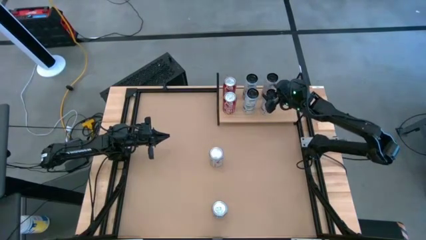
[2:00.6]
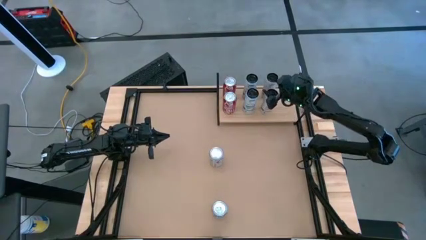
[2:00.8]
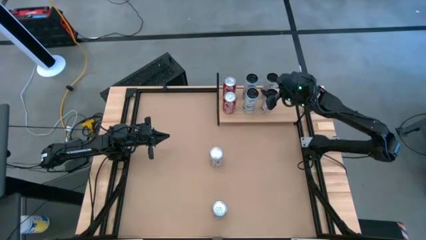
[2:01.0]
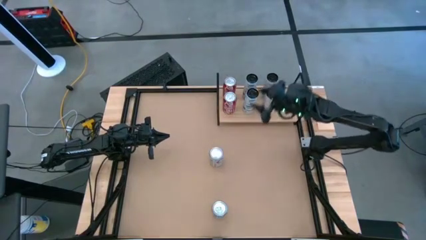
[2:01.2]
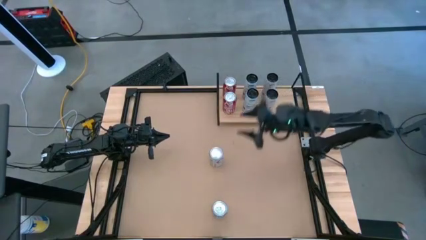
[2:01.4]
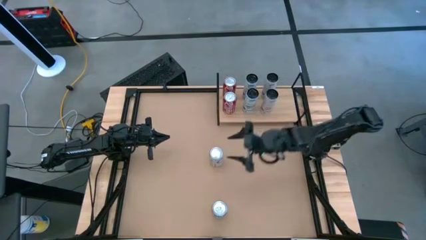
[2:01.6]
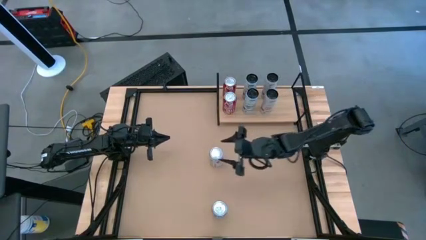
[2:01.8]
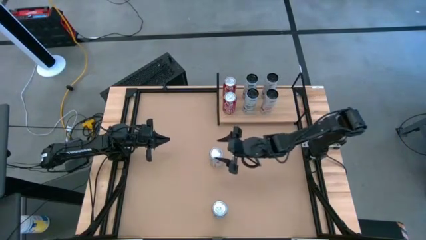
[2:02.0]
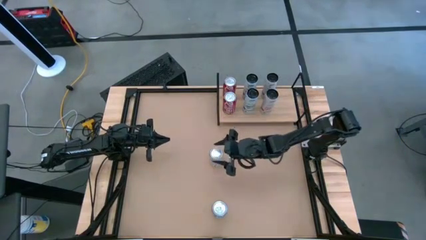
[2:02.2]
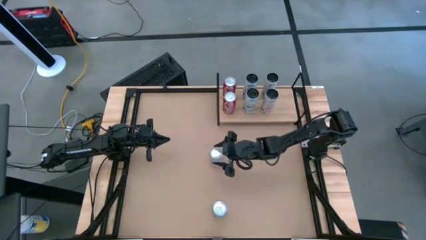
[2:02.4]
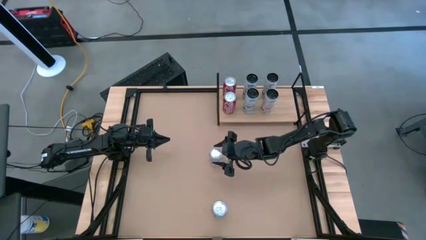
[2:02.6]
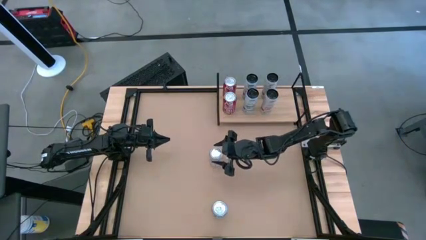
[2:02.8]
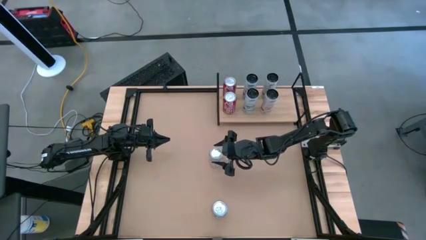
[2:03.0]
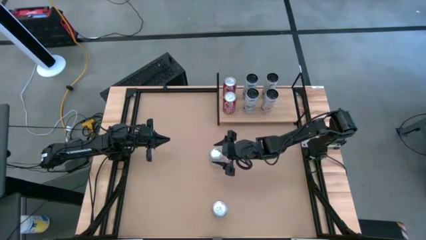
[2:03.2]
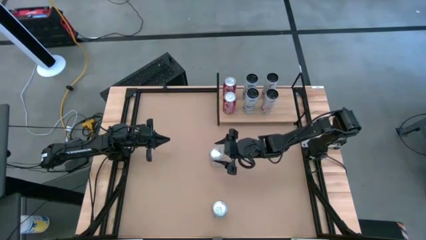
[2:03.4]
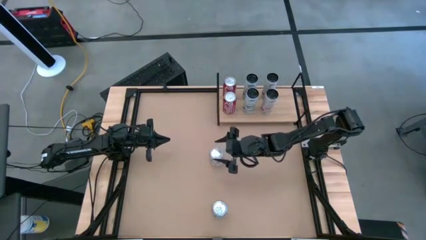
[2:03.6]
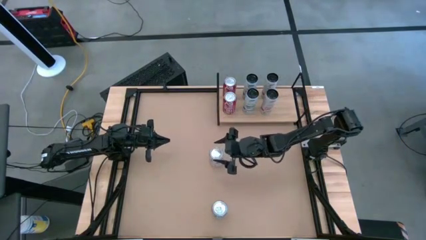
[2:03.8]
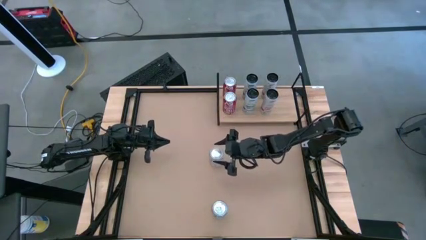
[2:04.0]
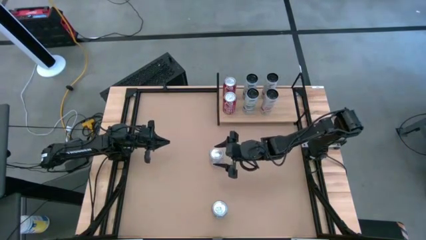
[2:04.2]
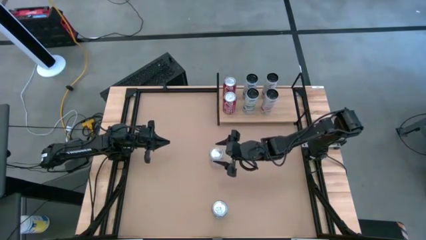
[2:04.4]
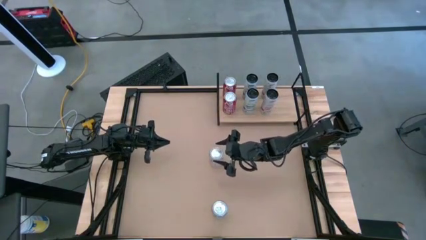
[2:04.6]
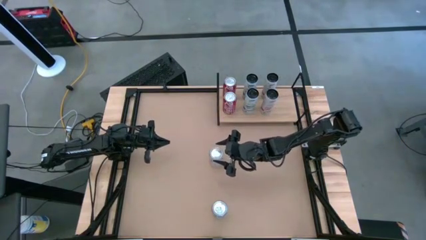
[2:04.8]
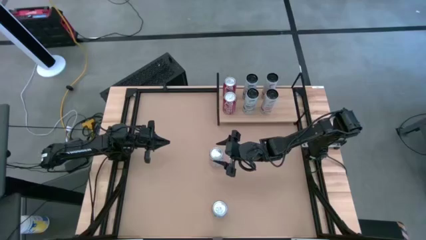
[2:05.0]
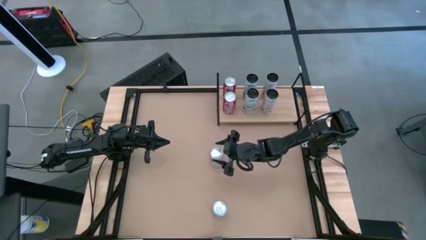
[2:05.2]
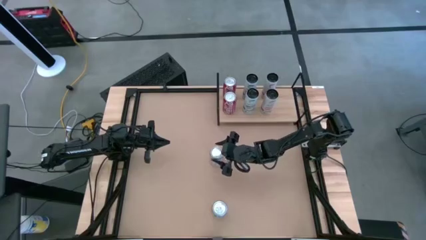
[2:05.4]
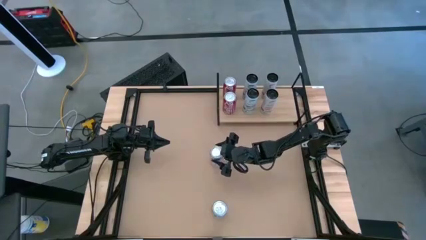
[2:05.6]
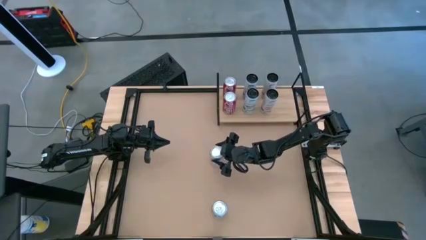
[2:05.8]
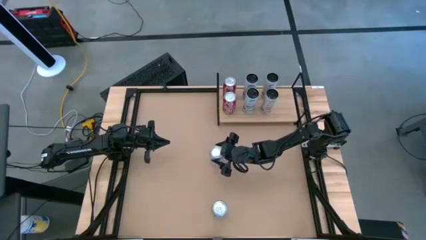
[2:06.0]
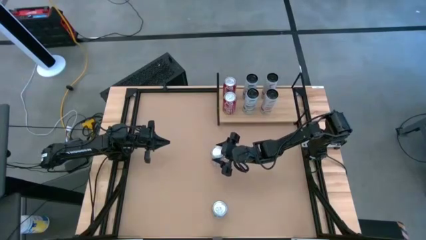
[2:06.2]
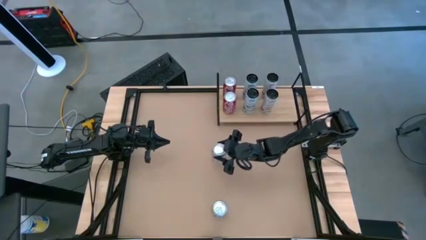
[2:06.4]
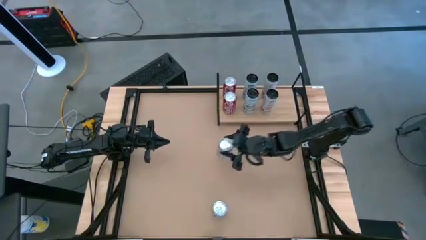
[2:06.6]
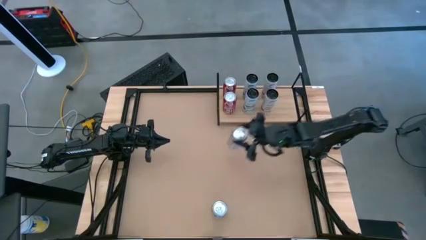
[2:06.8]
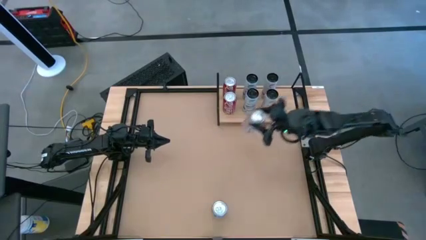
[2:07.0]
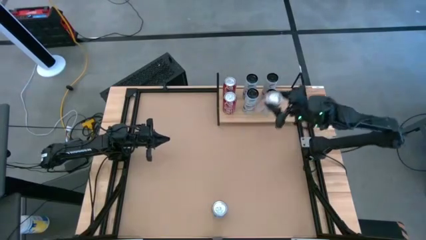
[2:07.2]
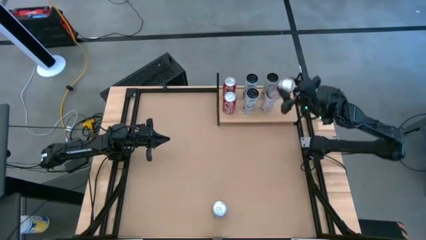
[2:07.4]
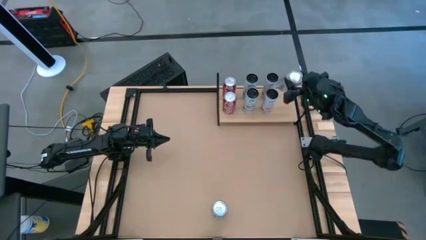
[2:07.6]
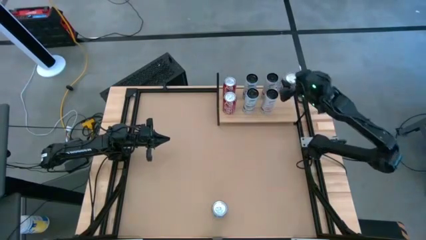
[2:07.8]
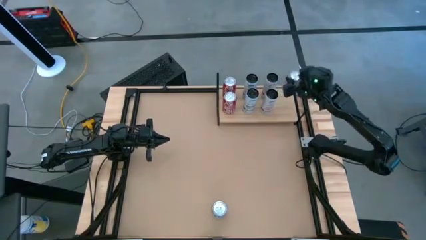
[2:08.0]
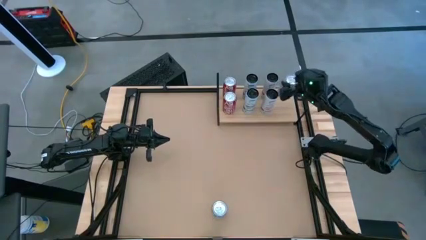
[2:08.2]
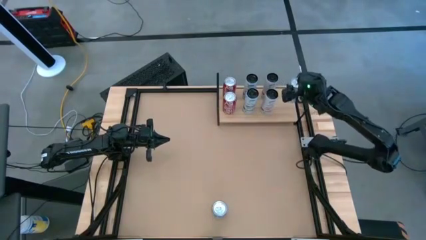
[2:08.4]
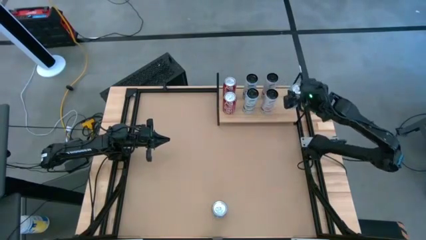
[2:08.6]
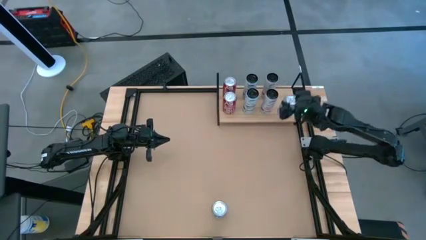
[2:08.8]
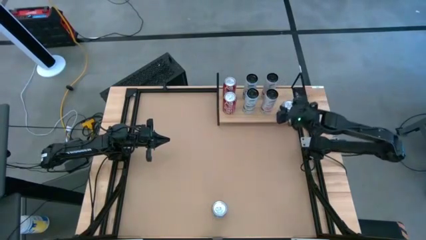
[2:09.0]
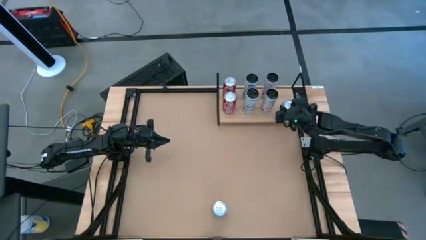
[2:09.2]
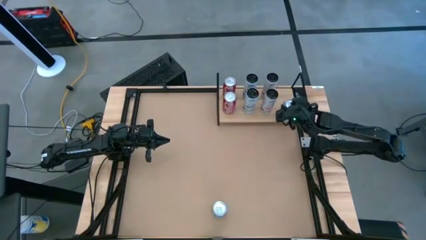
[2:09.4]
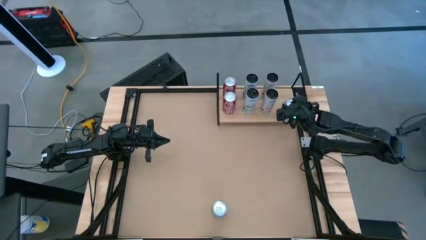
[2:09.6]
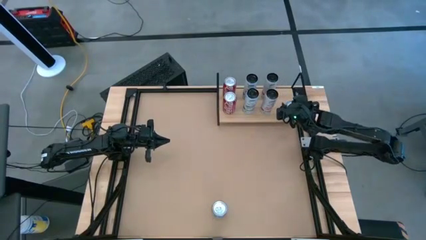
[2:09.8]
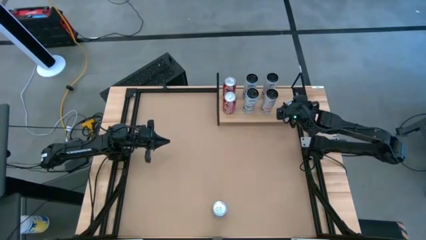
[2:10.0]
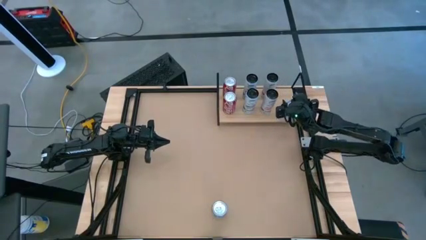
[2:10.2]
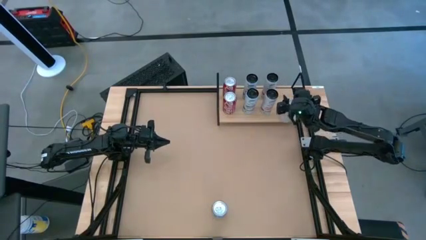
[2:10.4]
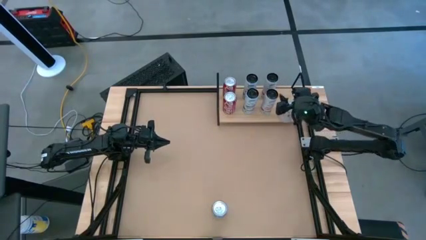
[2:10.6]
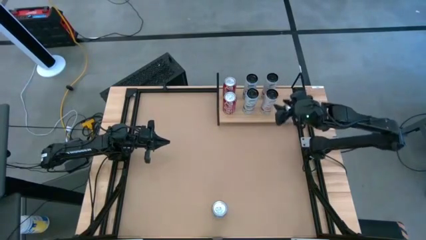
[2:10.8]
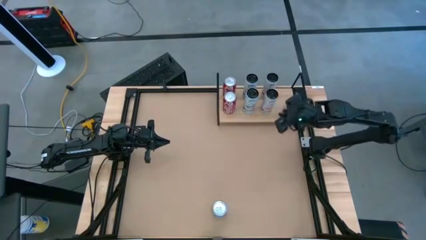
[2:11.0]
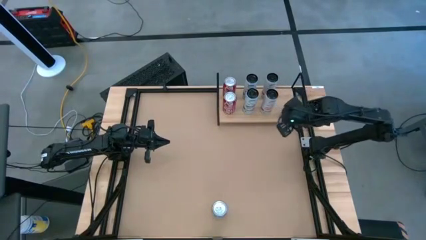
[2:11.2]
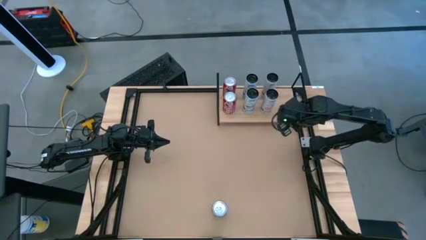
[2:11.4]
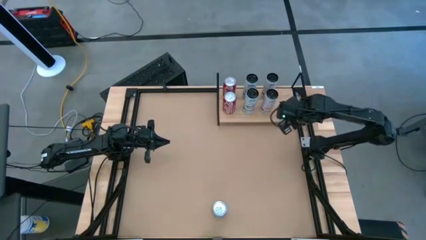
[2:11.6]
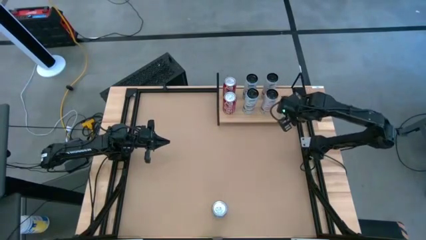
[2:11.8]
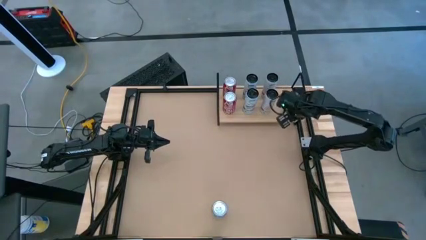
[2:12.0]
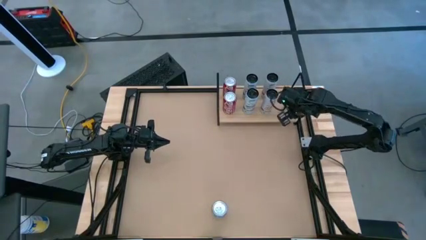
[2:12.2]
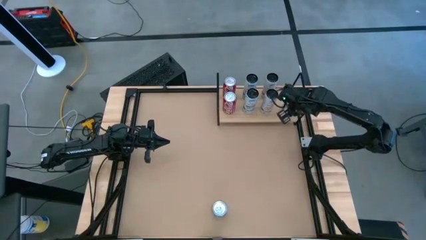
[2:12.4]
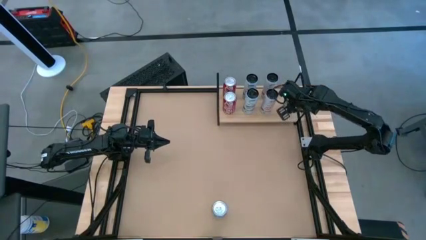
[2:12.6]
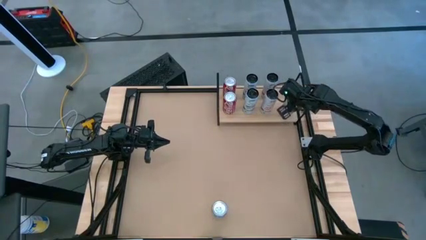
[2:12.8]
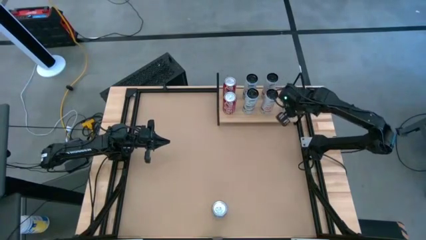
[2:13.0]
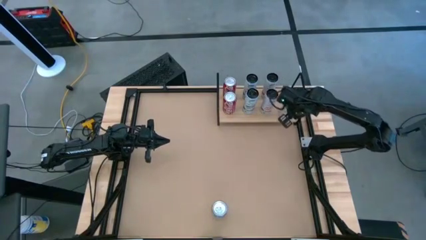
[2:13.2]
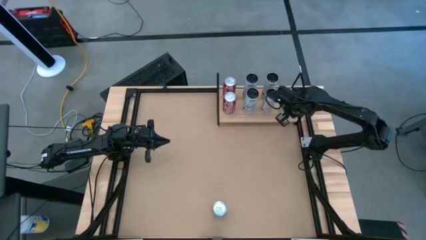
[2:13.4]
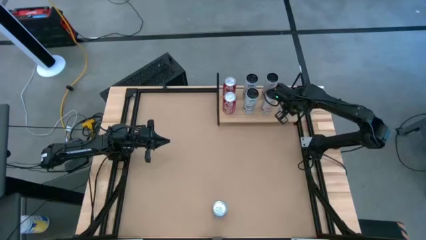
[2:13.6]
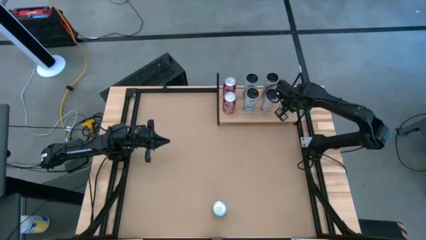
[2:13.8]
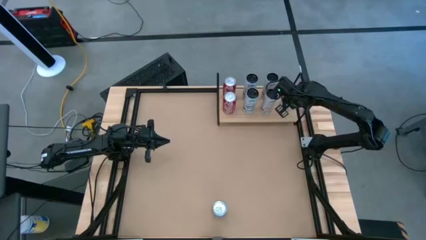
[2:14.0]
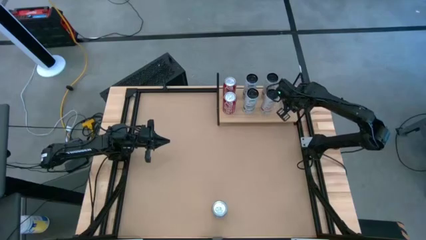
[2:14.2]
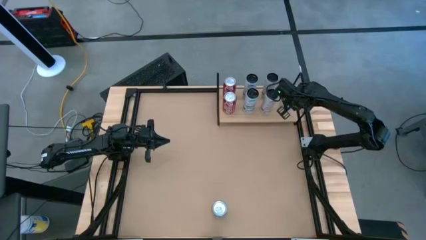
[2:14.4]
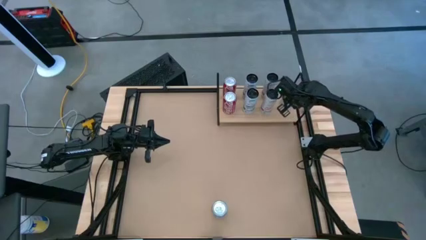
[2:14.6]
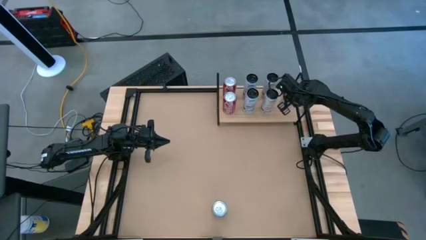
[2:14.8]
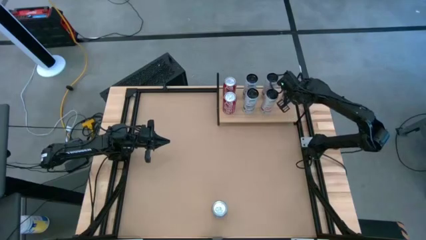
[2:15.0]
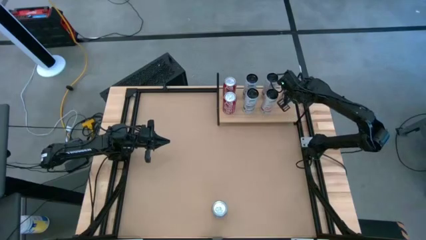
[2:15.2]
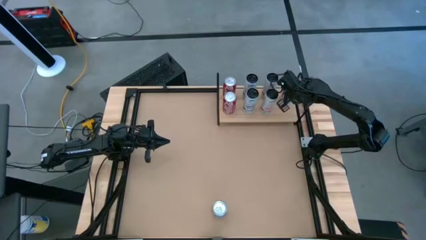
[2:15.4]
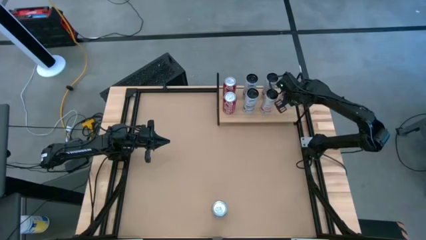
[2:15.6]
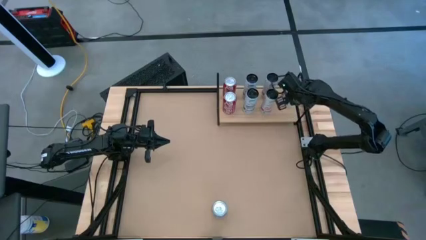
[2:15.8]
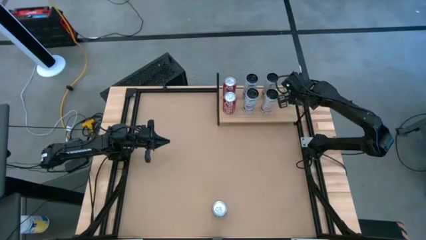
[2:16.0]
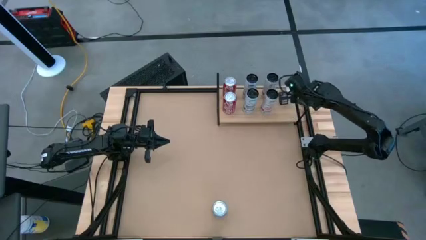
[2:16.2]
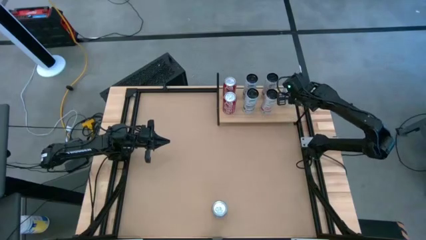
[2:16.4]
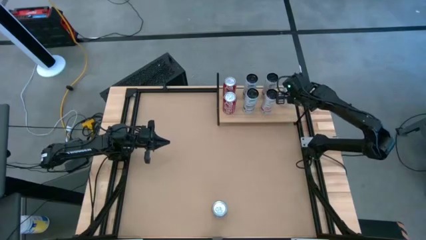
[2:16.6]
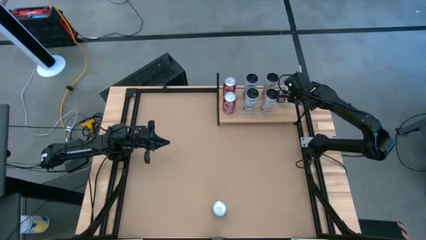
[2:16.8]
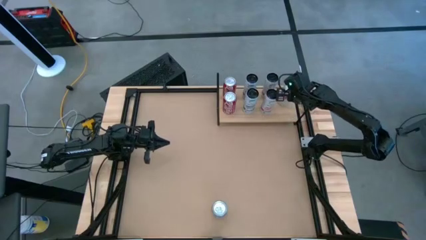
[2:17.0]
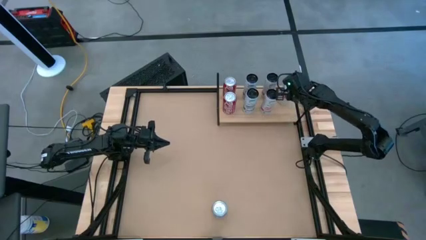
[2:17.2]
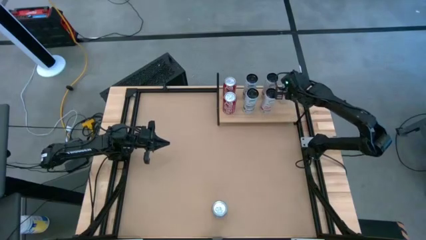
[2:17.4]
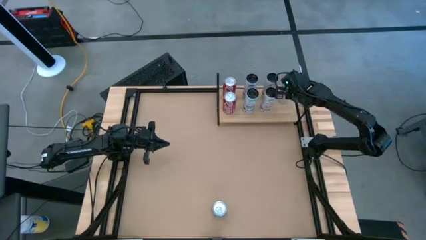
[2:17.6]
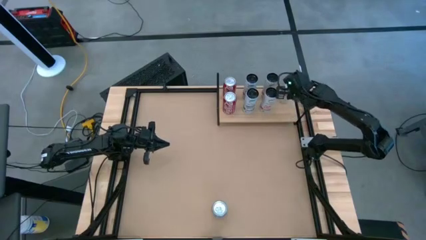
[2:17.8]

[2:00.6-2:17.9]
Task: Place canned beverage on shelf
Put the top white soda can on the shelf
